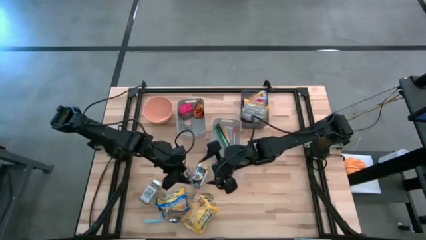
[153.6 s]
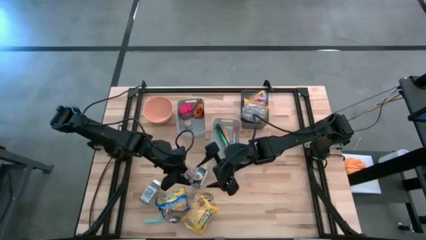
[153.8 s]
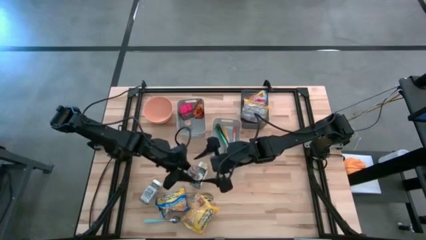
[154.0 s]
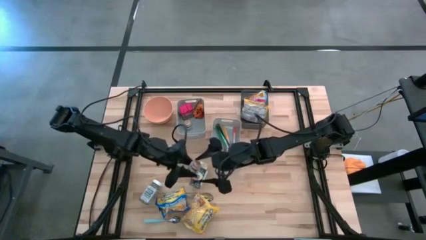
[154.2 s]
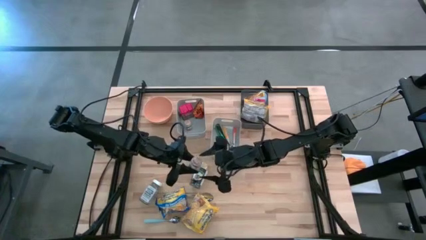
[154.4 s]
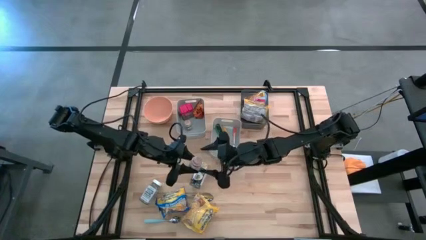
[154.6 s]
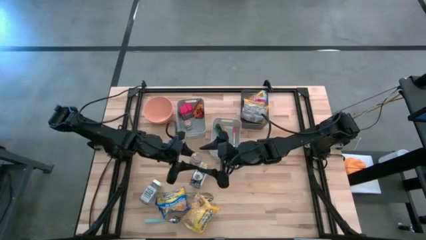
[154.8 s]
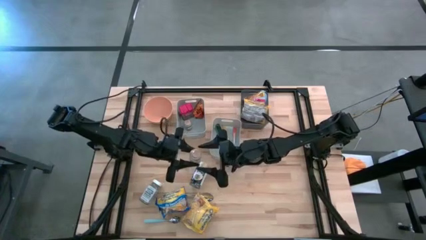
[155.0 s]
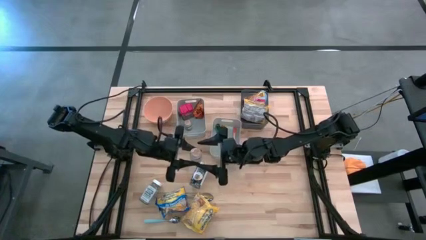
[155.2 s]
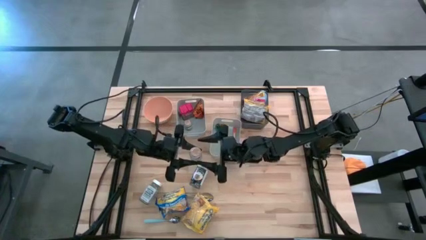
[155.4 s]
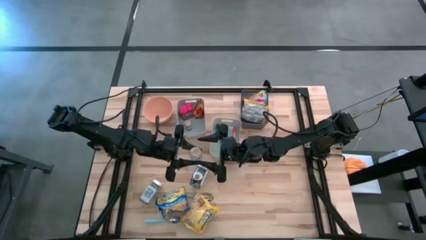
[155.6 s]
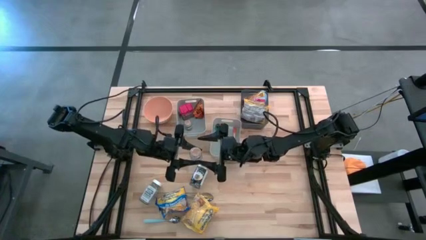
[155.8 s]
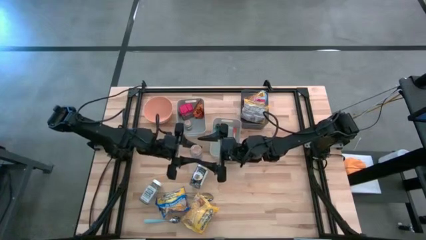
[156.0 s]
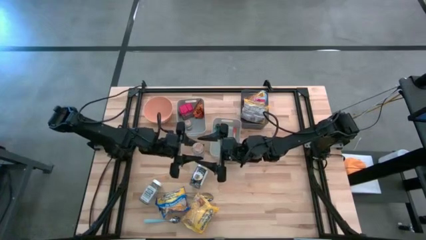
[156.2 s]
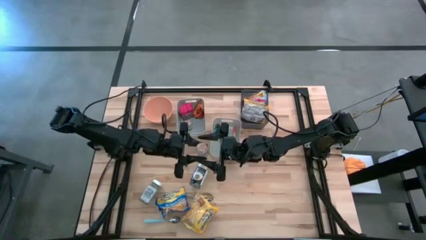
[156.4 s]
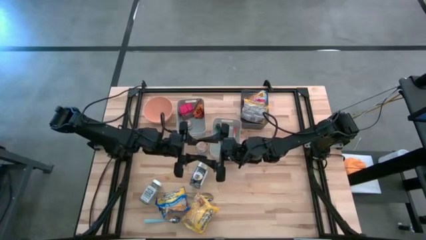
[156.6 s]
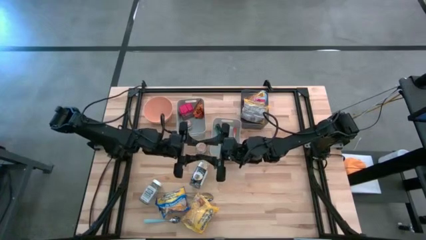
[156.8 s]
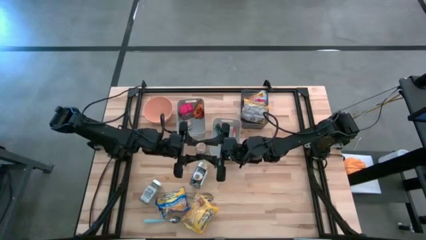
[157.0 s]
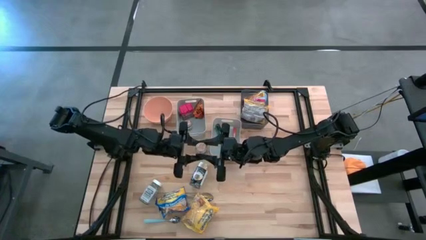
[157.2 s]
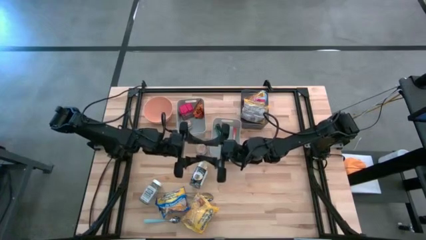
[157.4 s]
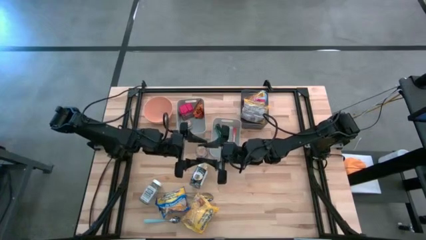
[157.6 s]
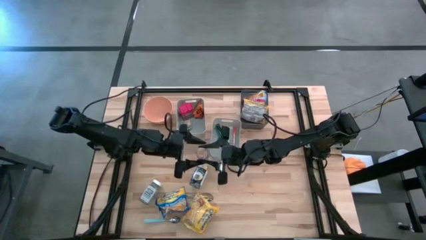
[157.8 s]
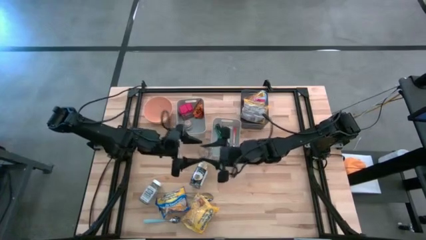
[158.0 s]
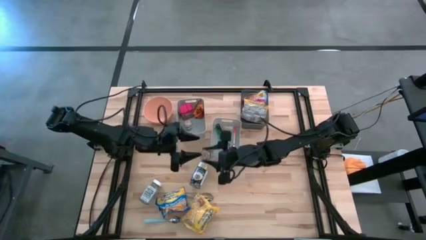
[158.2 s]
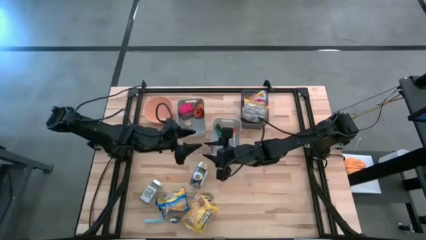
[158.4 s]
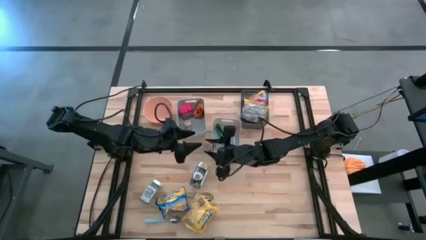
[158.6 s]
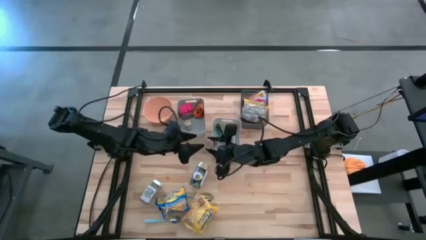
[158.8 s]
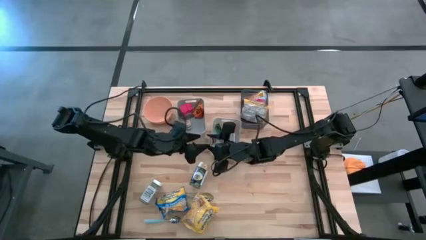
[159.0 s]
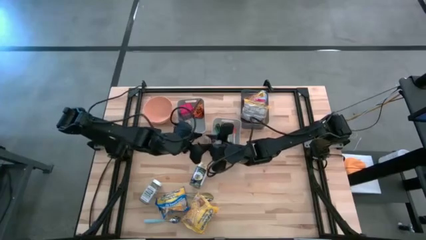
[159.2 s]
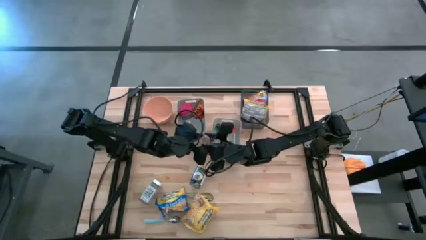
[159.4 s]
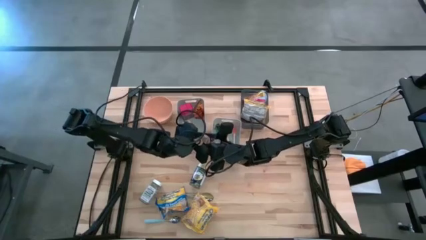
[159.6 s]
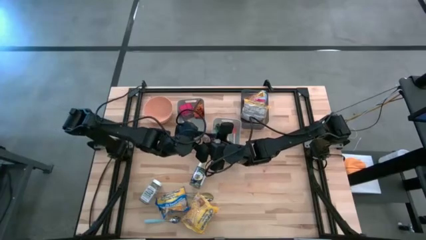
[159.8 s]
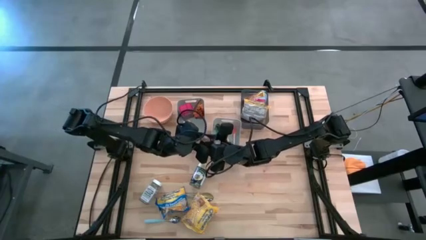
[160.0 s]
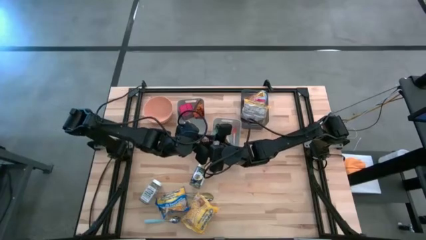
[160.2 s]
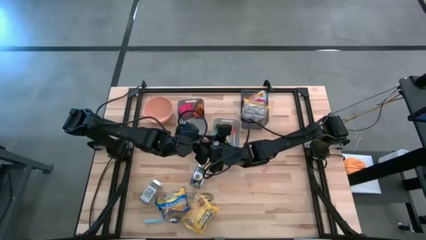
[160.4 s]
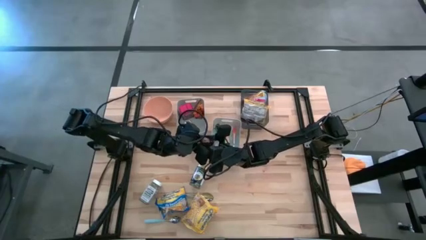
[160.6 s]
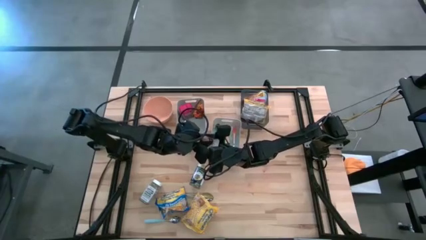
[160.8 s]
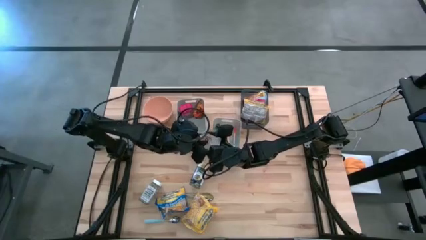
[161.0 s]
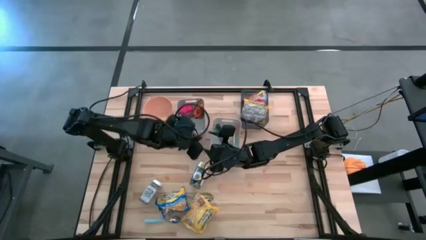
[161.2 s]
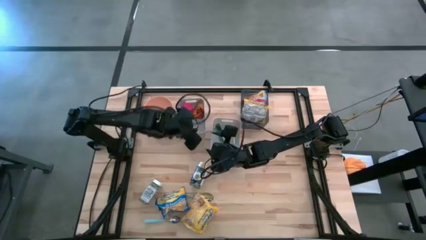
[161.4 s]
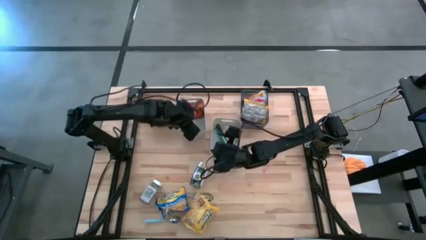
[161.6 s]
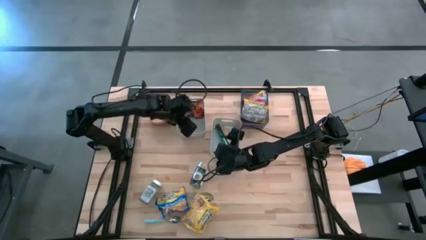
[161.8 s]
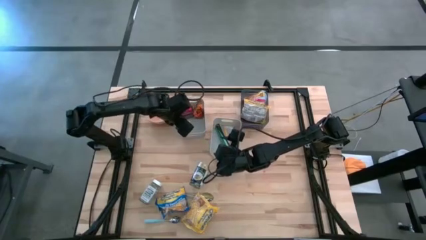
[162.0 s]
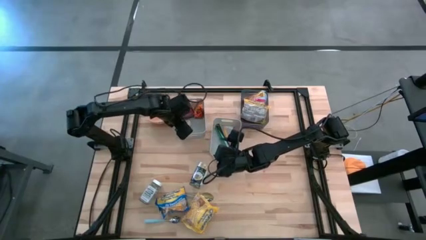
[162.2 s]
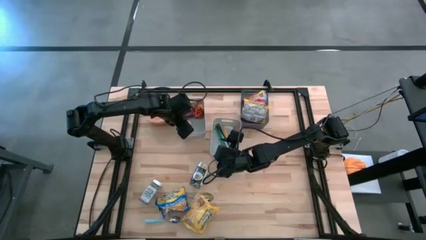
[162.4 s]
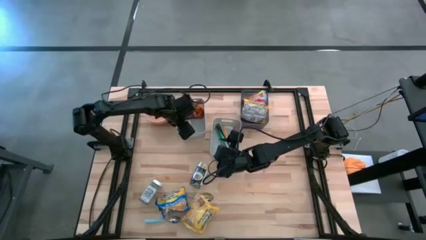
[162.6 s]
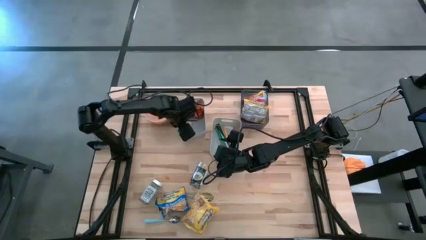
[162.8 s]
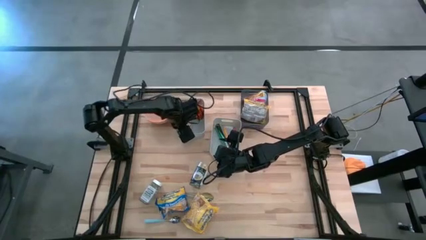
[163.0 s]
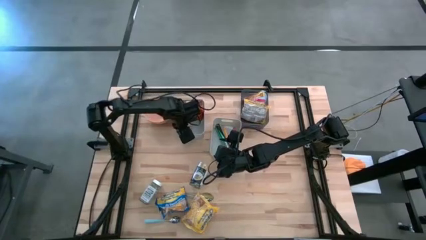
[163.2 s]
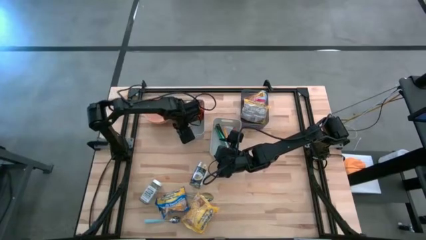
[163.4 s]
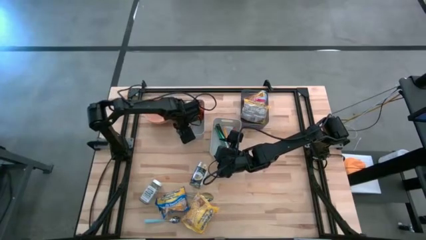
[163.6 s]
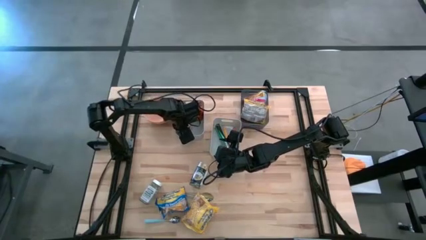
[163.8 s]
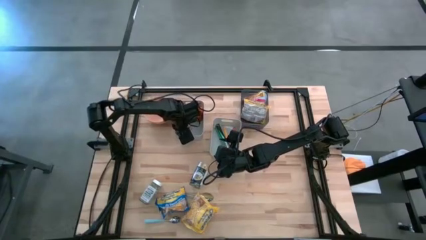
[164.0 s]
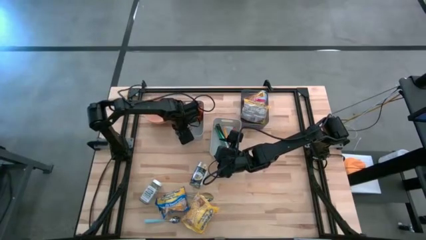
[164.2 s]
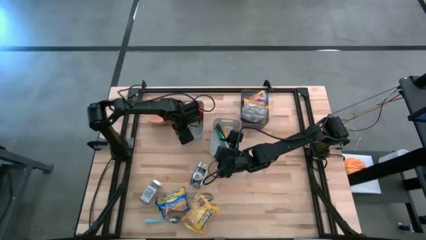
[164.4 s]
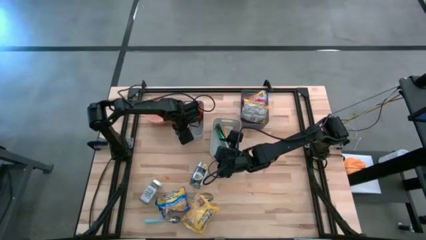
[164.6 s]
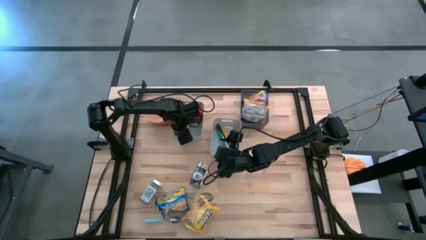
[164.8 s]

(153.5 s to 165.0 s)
Put the brown seasoning bottle into the left gray bin
